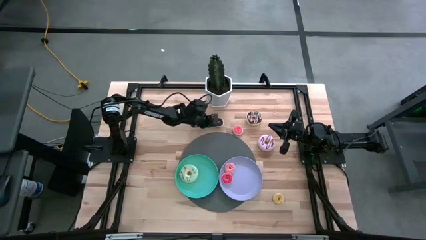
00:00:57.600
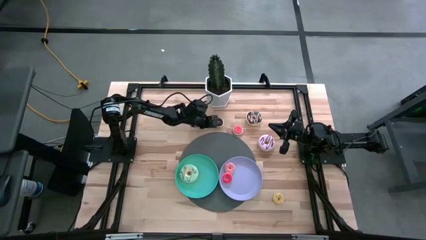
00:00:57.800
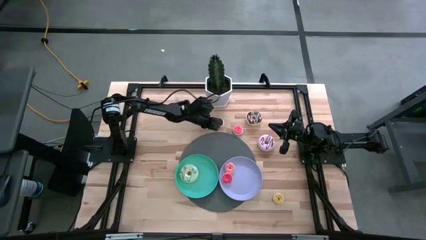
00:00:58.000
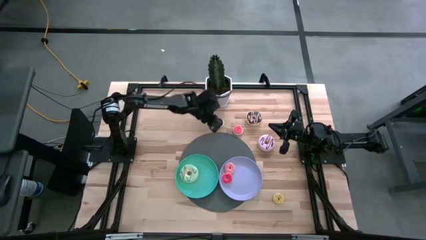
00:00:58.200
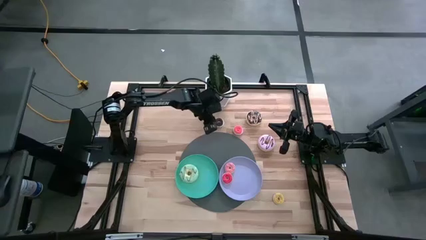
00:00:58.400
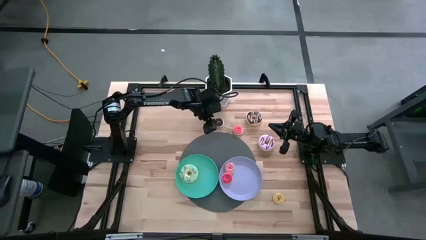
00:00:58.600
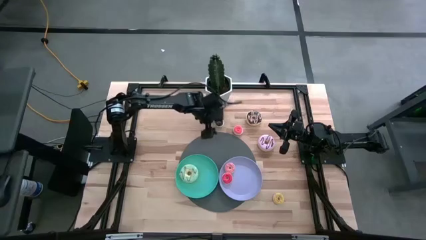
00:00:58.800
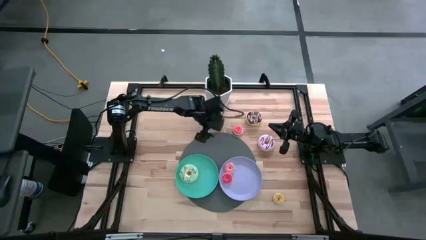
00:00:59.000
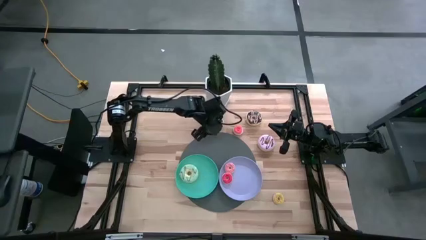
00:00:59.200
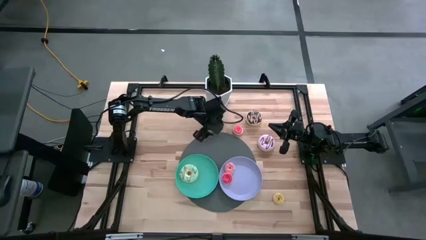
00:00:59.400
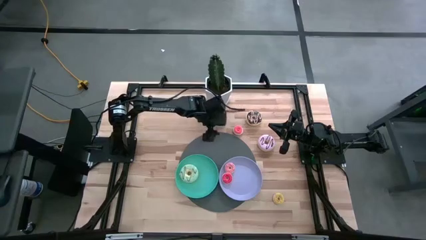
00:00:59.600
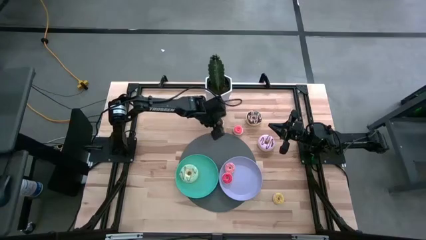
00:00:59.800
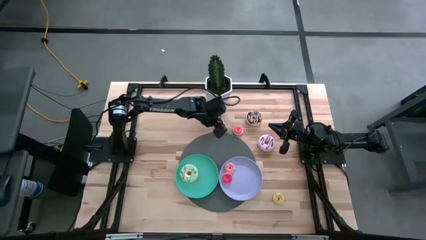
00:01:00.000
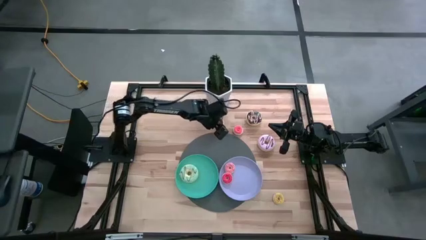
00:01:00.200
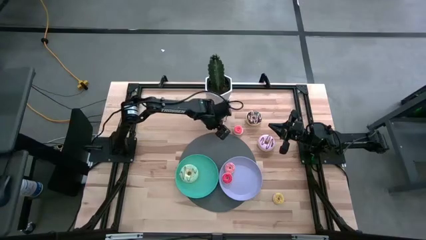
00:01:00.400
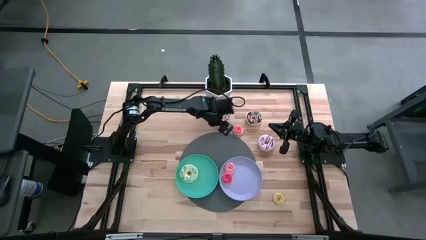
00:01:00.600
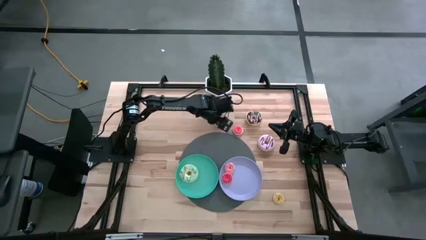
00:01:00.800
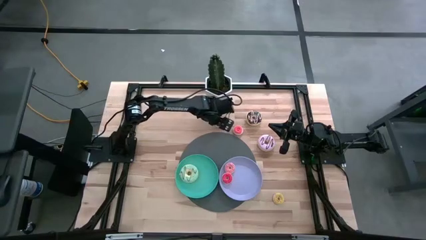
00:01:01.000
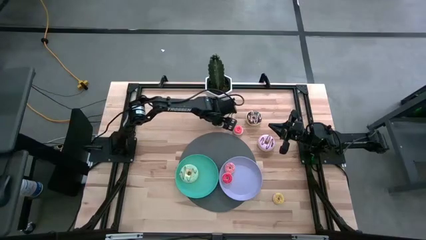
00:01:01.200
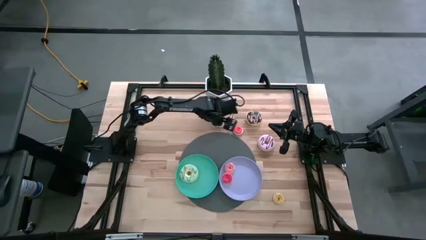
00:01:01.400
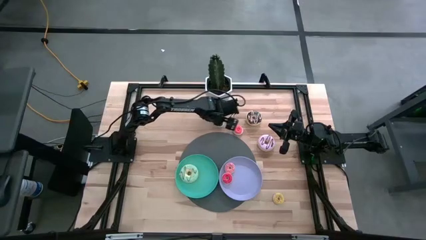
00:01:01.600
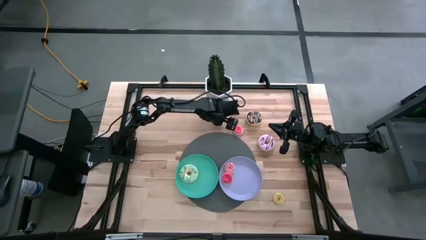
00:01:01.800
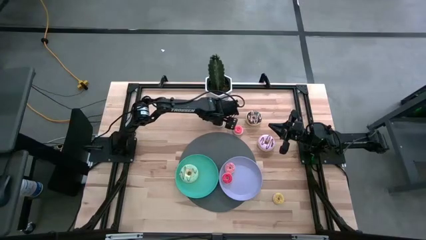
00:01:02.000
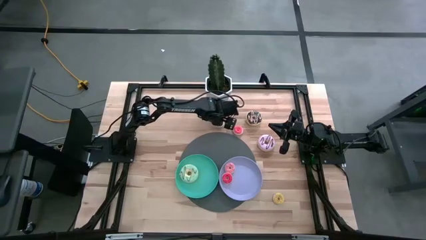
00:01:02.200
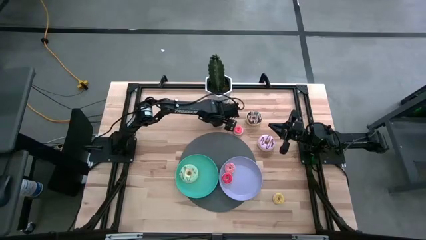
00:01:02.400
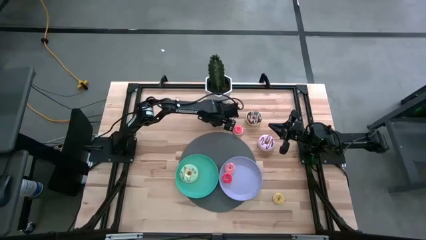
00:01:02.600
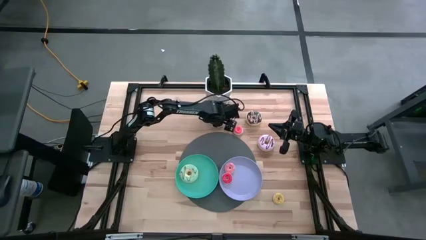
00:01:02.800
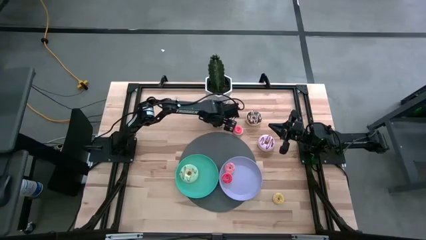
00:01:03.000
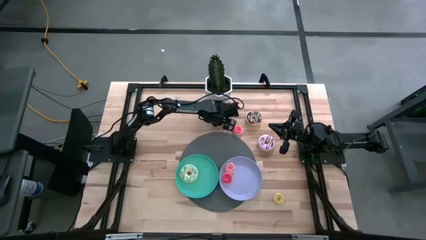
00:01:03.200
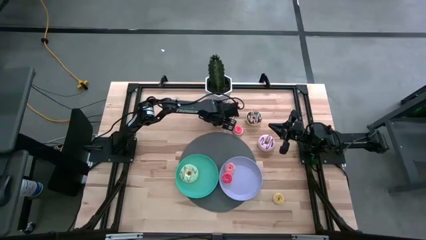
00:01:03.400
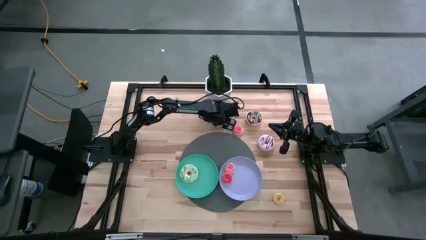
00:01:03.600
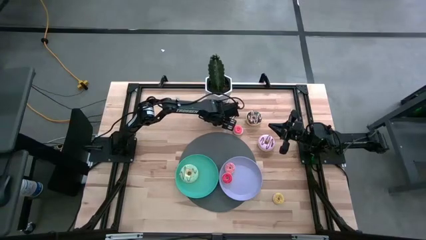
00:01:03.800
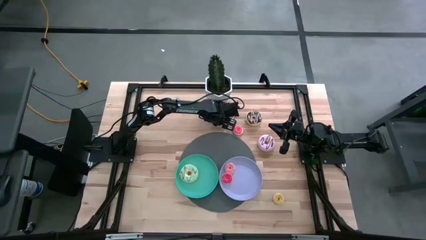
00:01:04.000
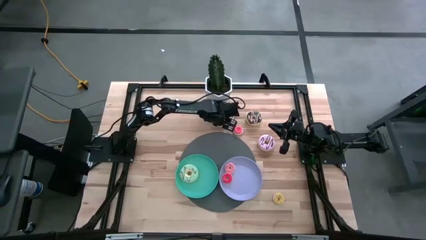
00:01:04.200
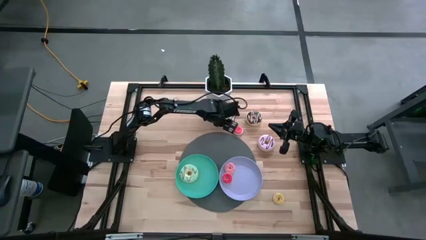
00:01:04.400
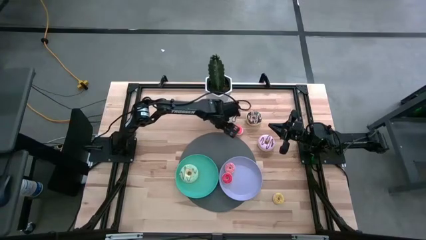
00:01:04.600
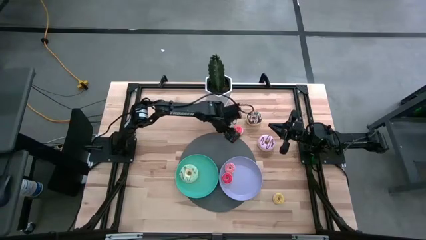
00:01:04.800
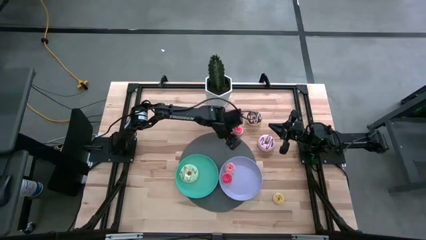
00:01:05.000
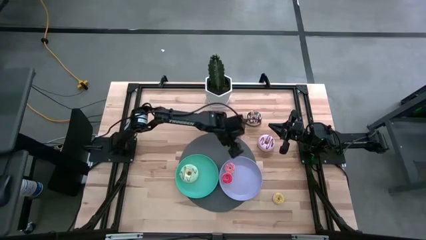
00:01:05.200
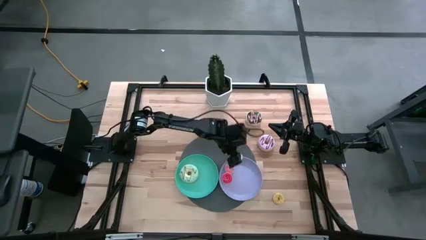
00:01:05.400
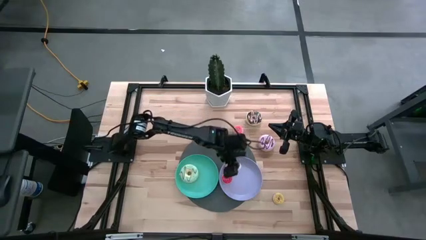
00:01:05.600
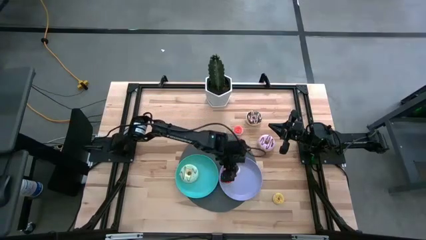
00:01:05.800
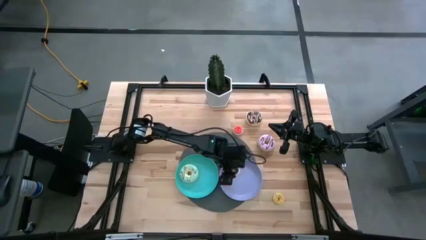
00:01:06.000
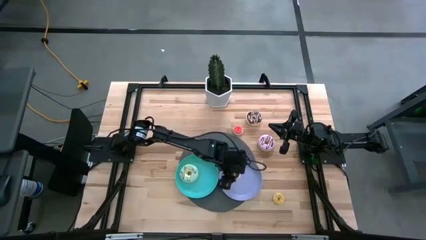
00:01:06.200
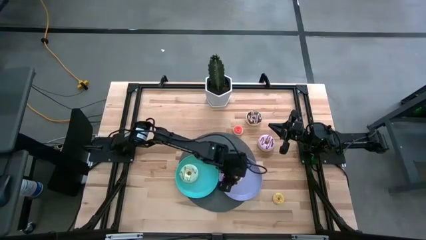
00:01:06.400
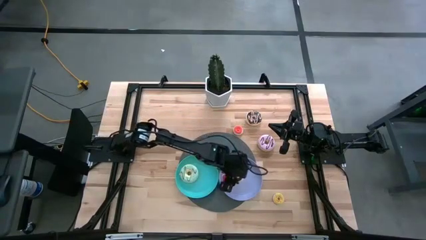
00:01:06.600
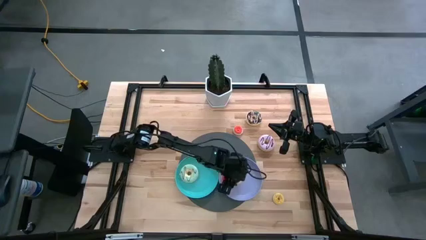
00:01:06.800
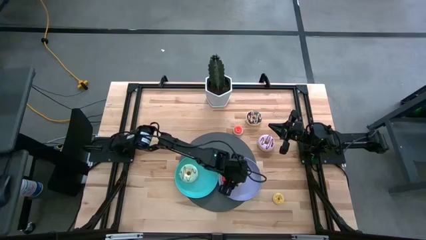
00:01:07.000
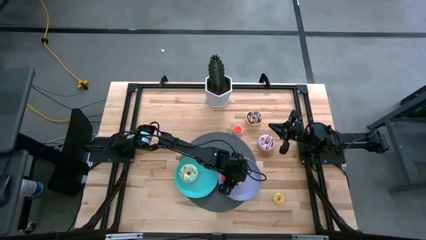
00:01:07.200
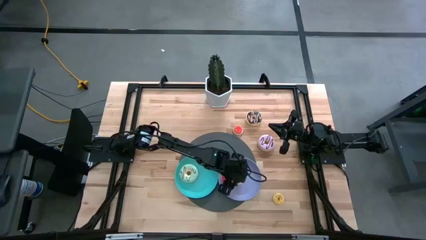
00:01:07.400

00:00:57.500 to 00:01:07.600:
Task: Pick & Place donuts
Put the small brown donut on the purple plate

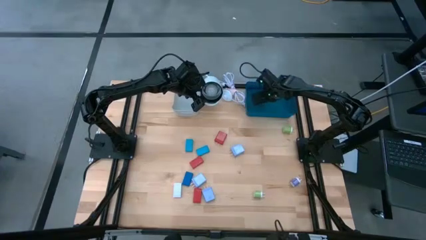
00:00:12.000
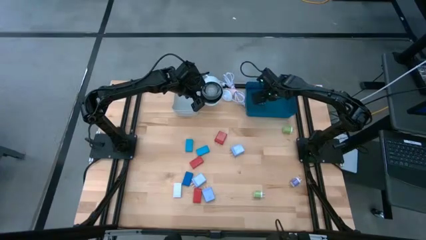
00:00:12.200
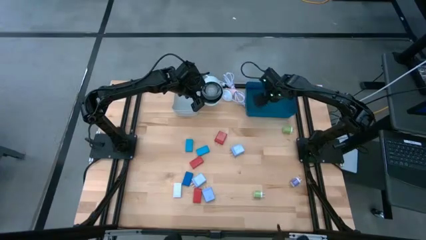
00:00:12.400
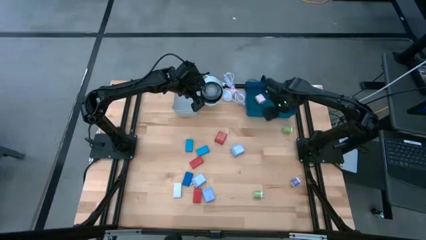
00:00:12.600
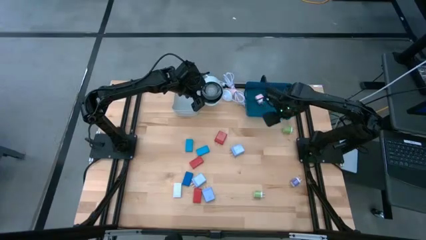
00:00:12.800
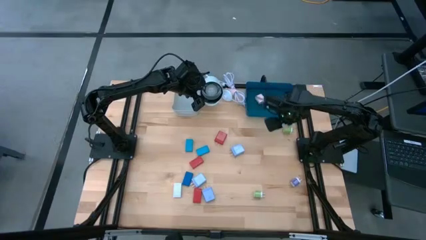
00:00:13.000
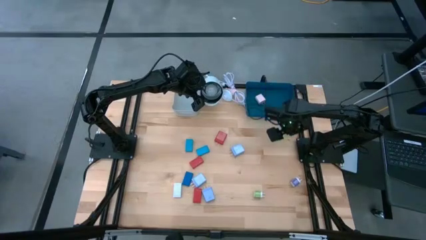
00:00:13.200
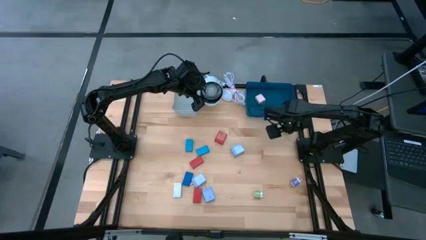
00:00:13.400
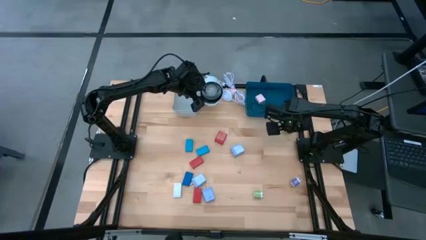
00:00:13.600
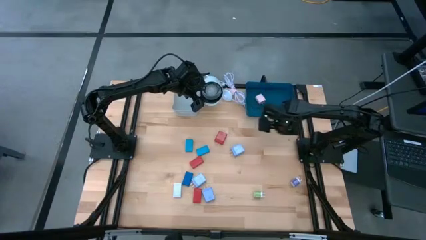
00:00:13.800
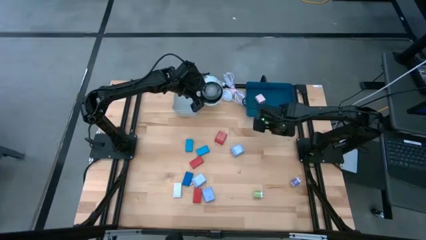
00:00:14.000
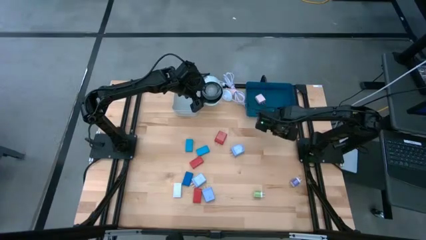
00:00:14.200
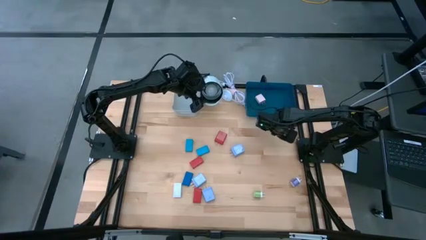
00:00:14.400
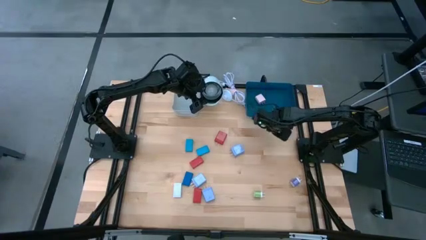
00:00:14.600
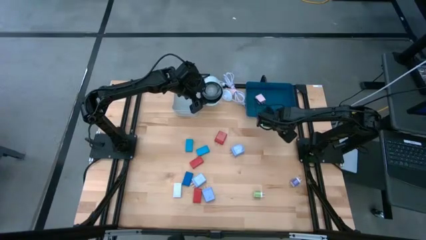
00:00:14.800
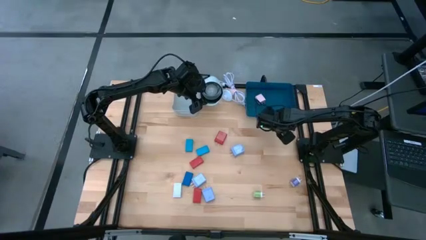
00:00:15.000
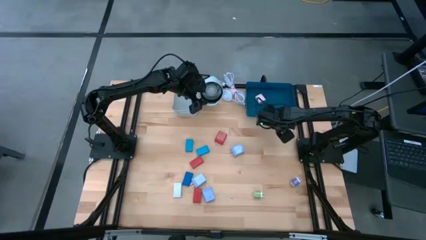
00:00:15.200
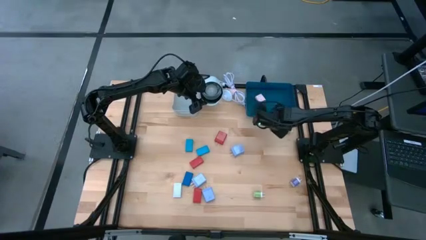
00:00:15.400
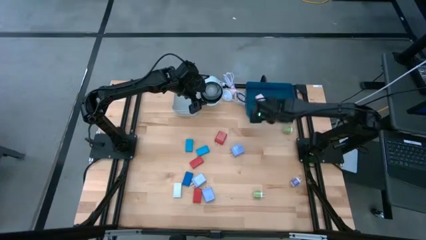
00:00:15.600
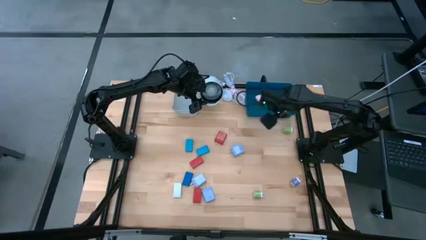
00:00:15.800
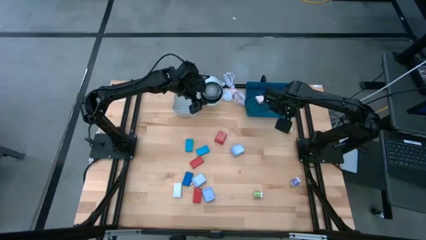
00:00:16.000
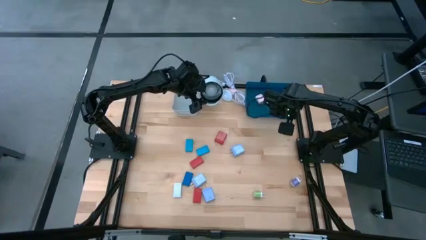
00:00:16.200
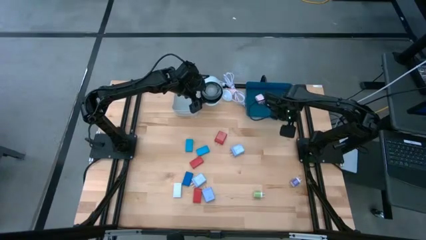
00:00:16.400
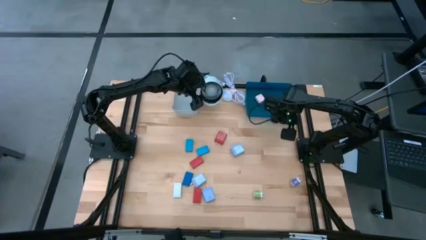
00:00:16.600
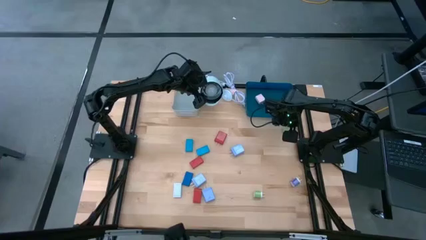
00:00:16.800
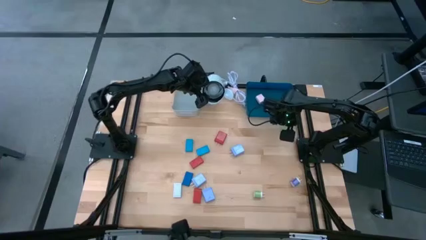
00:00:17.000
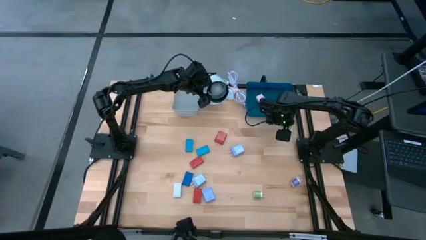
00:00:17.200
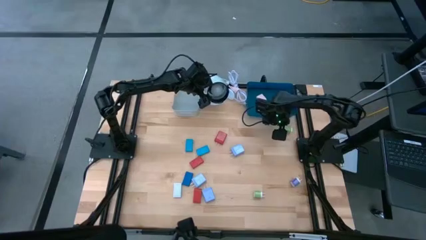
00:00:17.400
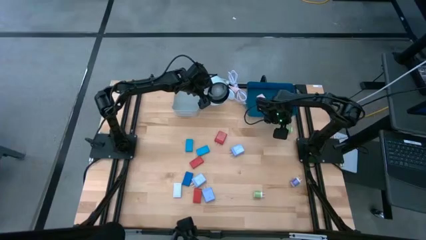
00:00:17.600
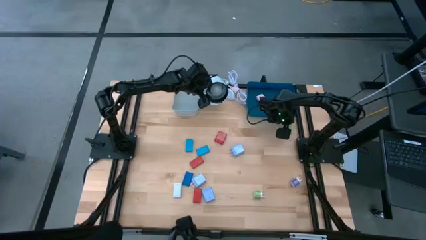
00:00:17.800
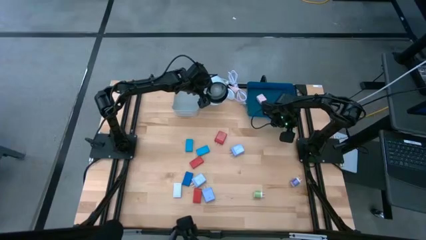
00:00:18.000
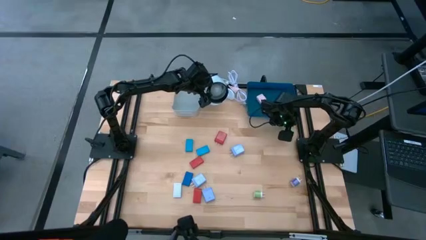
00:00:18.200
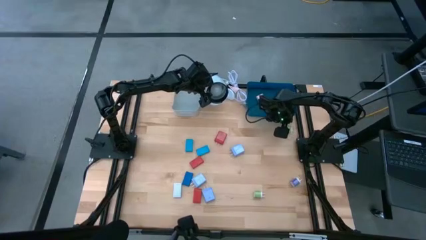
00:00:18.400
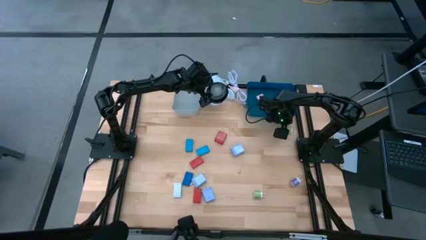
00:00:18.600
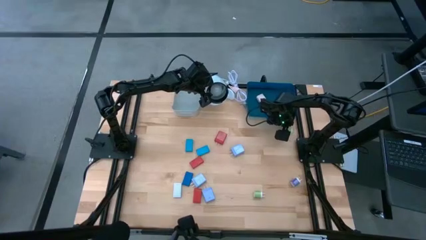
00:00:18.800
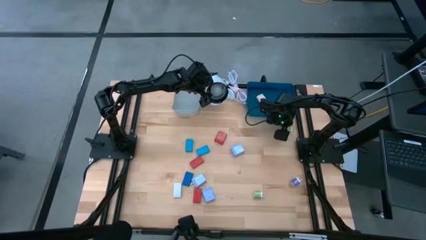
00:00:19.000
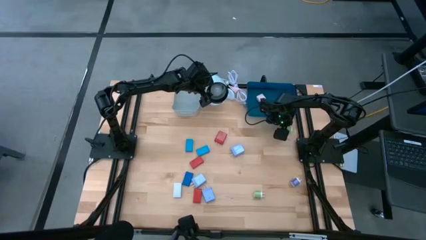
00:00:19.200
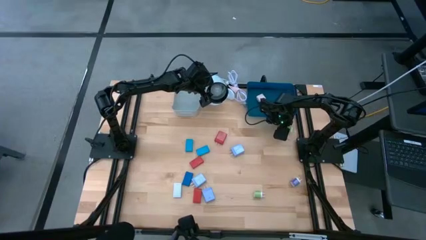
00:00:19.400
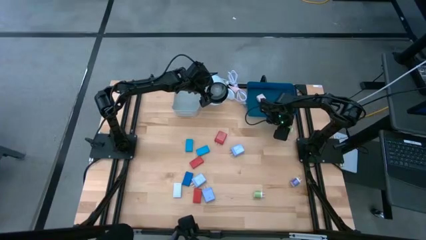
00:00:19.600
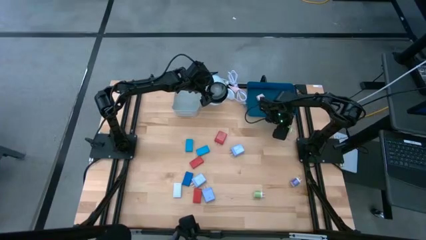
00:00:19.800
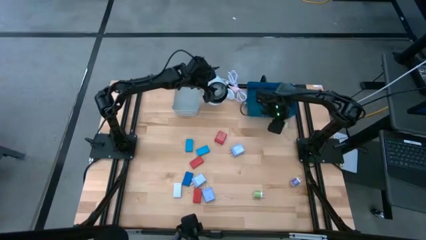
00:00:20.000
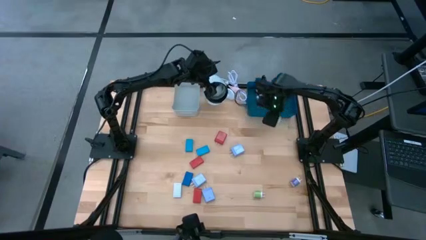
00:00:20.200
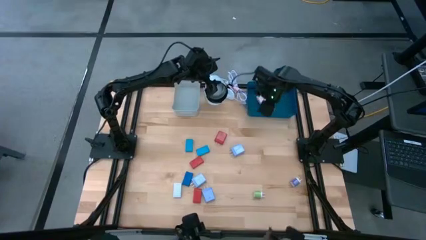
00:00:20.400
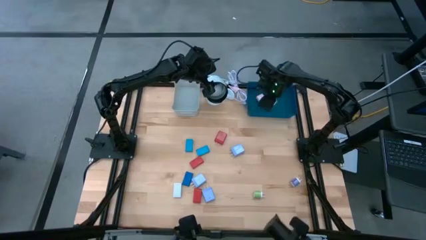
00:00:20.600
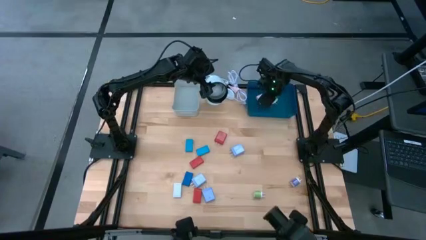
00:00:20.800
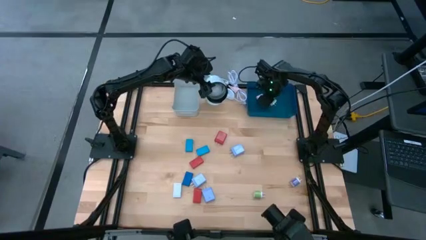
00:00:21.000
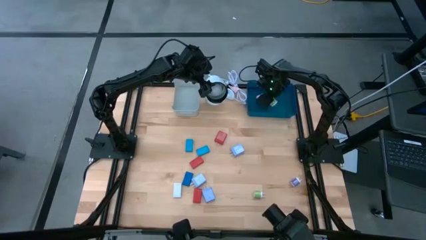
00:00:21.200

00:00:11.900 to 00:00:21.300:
Task: Pick & Place Office items
Put the top green charger adapter into the blue bin
